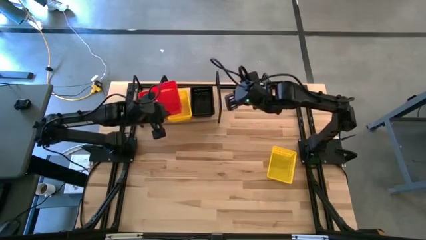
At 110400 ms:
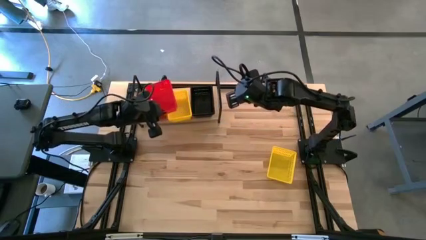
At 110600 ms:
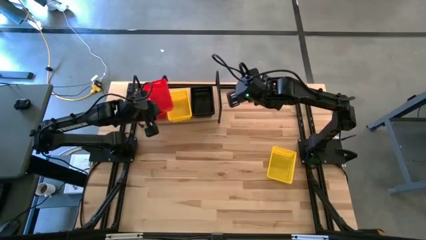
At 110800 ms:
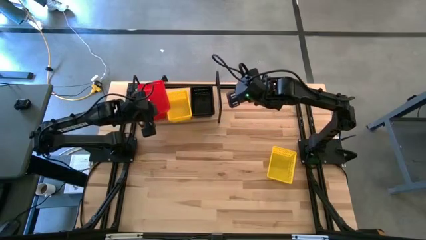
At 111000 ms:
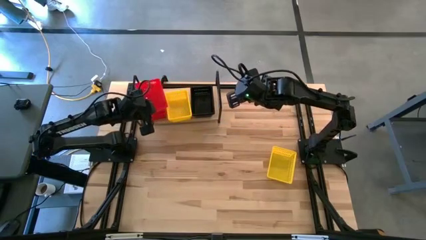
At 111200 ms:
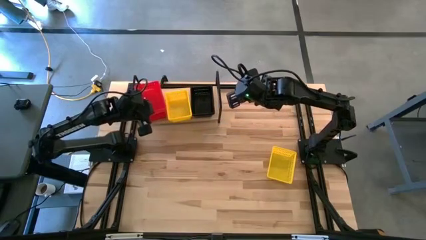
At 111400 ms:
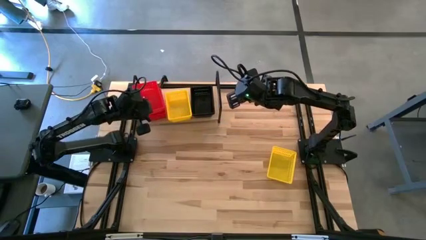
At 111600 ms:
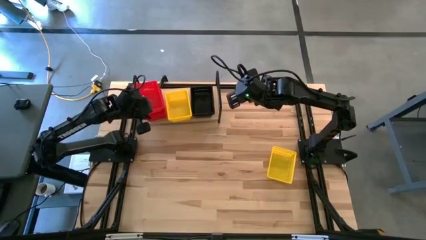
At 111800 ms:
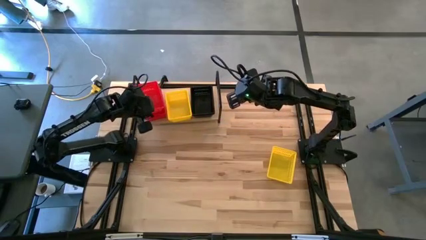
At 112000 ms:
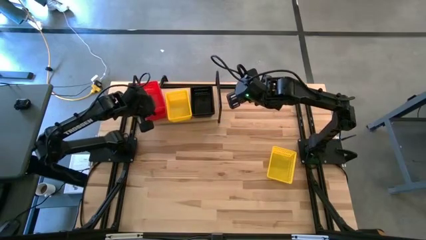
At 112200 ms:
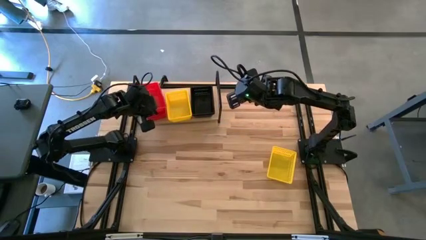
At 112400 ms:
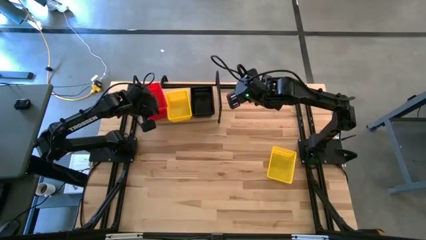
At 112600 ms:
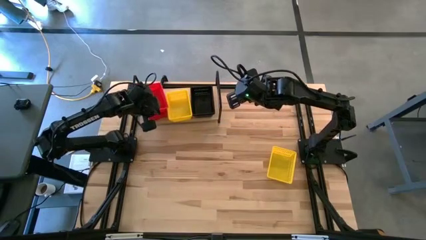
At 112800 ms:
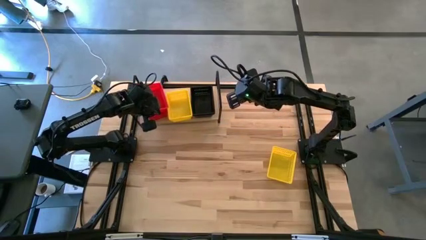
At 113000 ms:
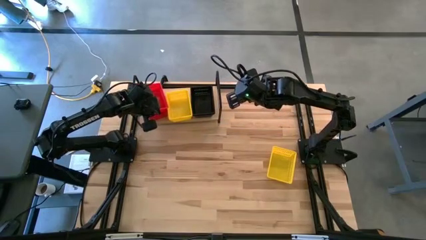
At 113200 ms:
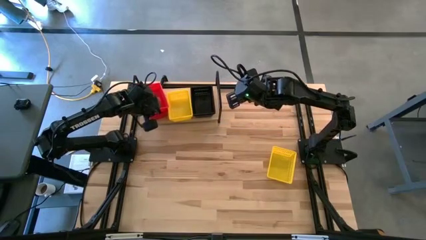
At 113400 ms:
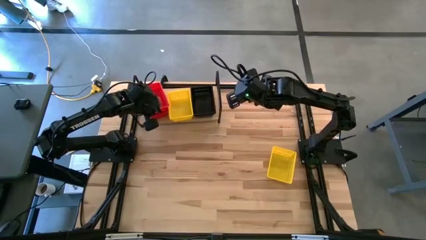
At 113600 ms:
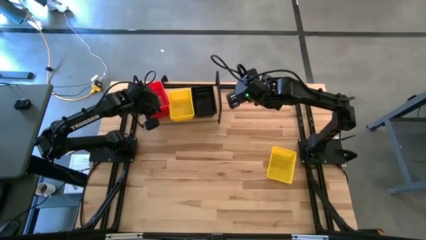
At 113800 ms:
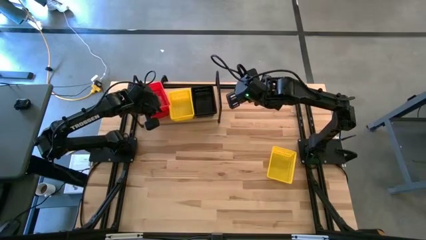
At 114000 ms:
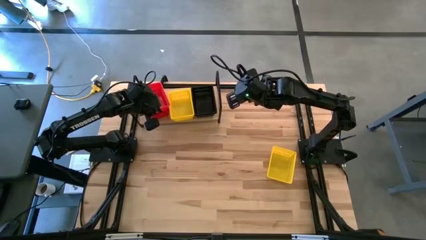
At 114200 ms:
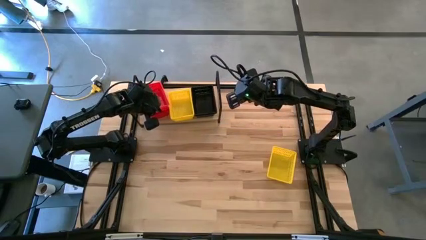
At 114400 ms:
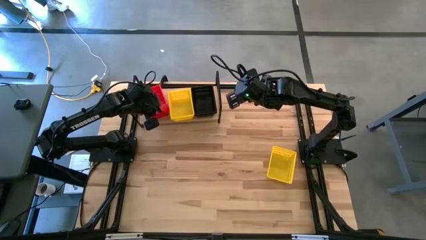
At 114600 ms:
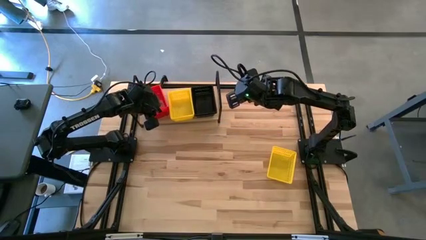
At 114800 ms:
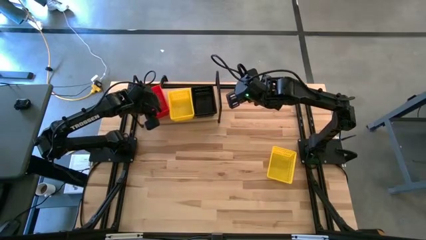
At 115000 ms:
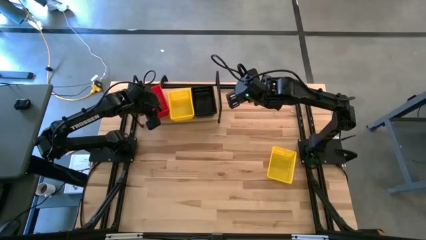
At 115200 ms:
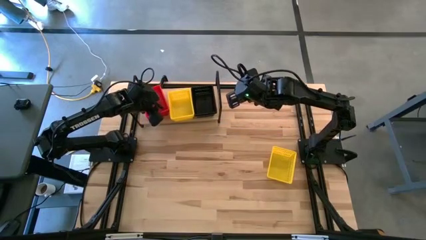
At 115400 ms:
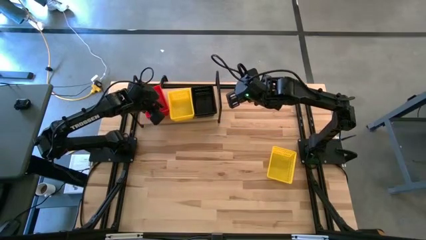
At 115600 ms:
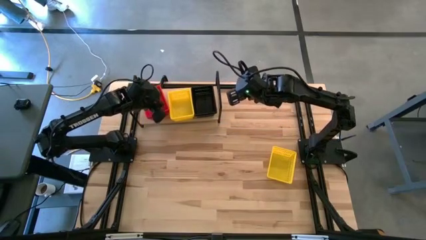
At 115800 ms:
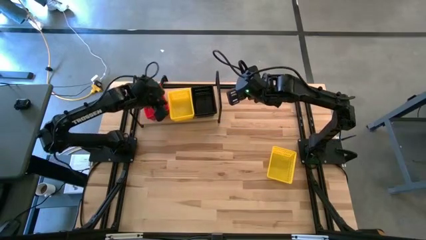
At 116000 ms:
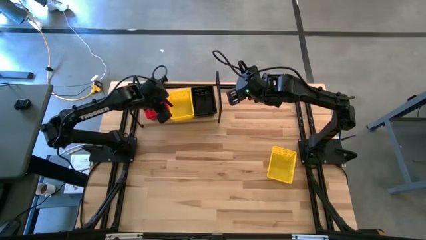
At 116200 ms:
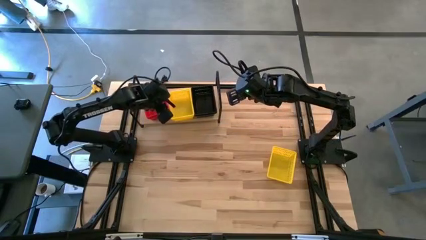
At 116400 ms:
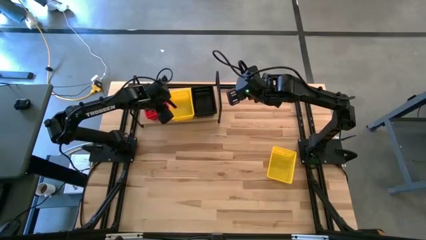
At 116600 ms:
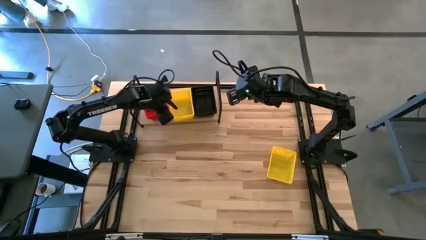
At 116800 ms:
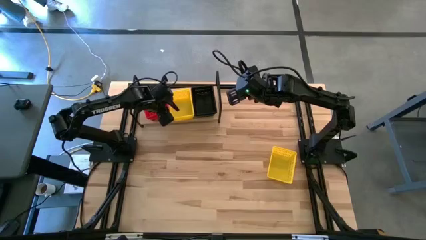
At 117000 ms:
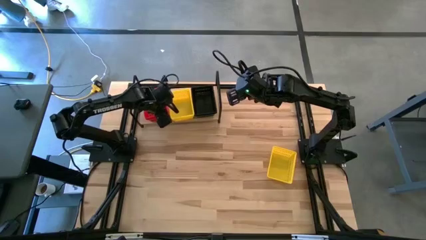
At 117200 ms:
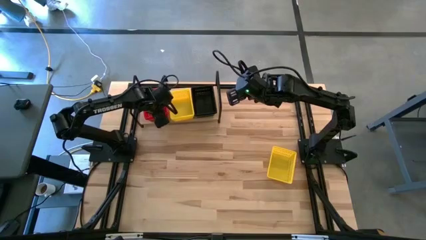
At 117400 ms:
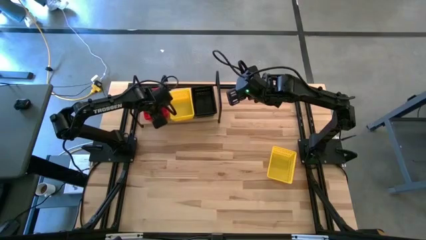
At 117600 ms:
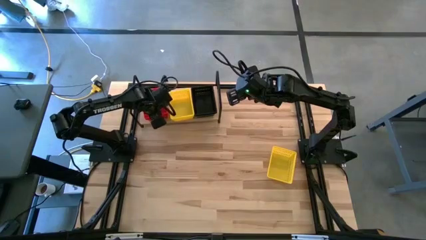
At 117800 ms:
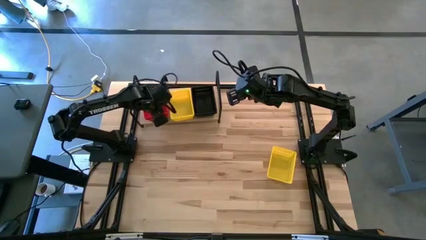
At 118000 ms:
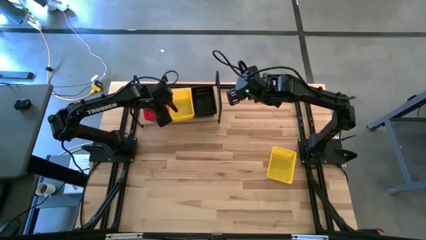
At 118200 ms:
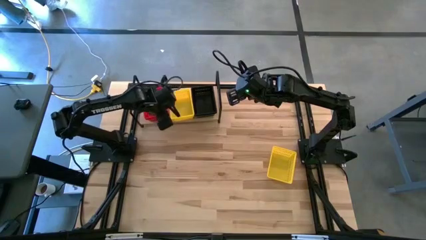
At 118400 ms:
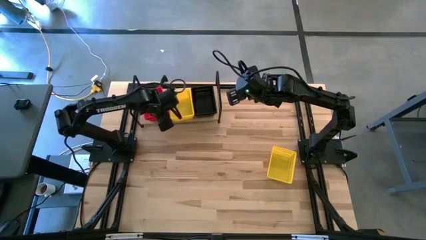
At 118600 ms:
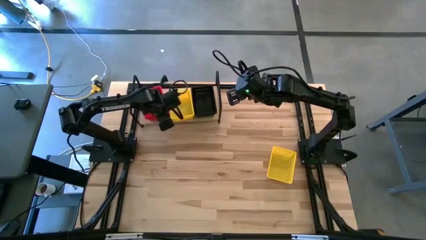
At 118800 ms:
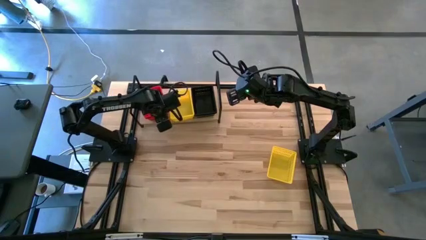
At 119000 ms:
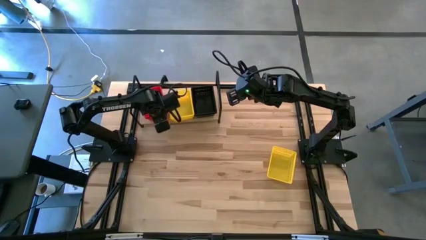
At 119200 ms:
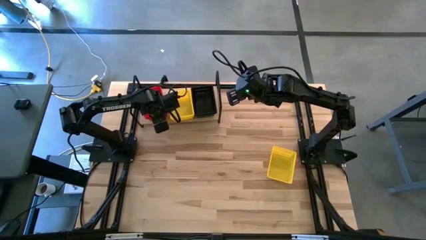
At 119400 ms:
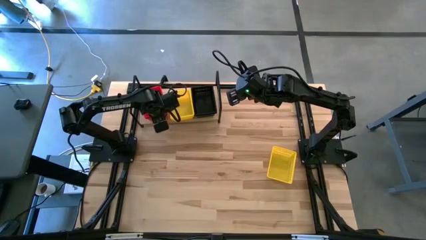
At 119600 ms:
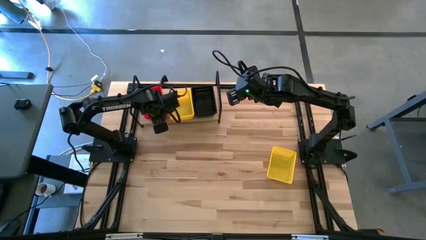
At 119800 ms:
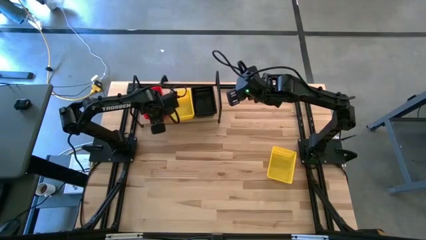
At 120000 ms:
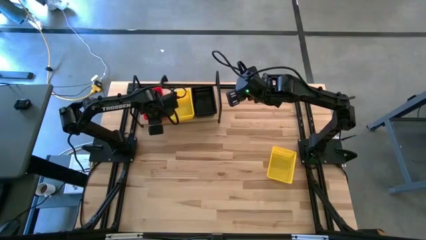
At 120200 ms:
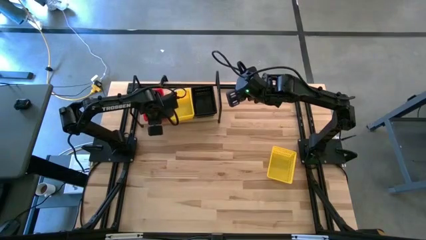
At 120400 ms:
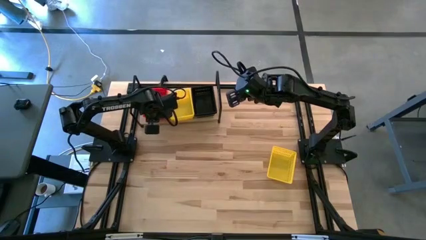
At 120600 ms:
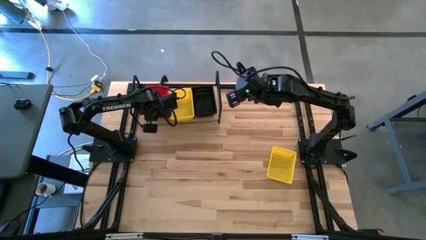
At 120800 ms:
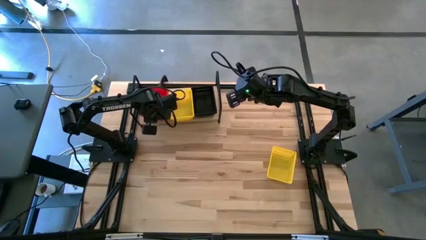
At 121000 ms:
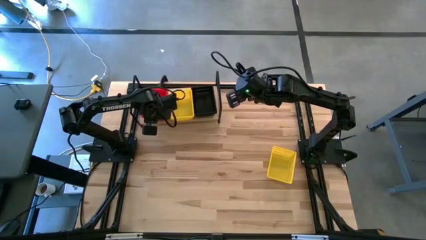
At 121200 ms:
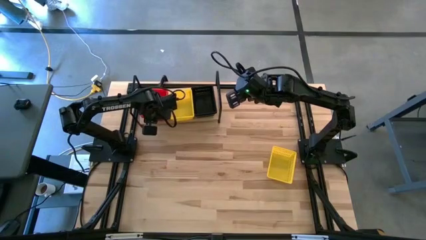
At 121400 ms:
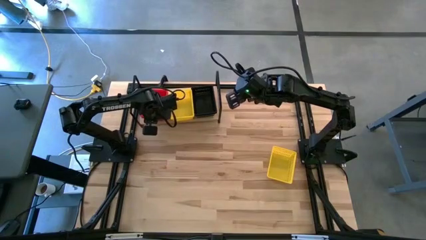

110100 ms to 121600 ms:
Task: Stack baskets on shelf by color
Stack the red bin on top of the red bin on the shelf

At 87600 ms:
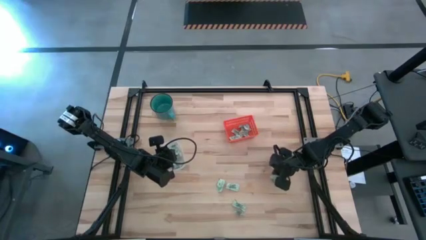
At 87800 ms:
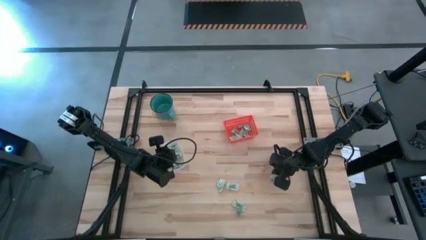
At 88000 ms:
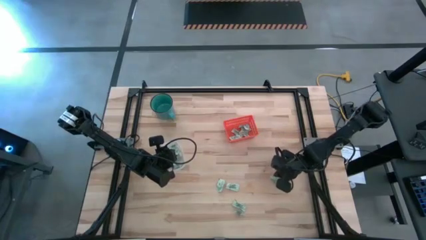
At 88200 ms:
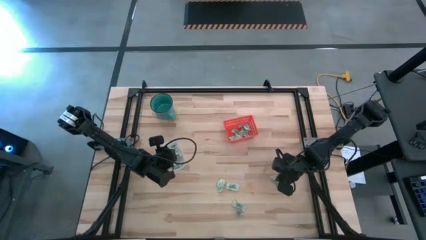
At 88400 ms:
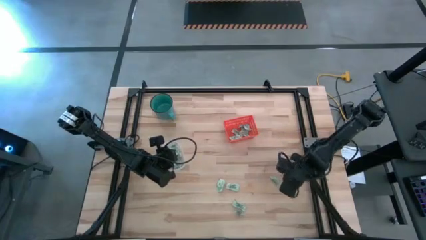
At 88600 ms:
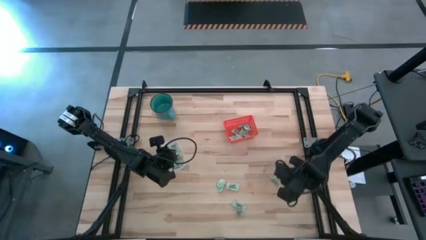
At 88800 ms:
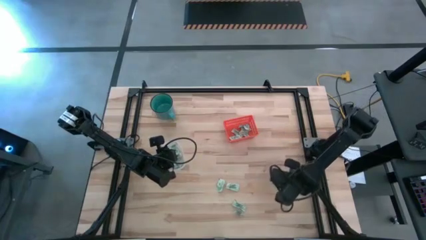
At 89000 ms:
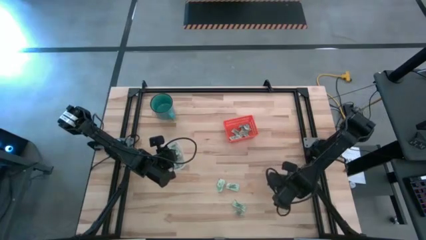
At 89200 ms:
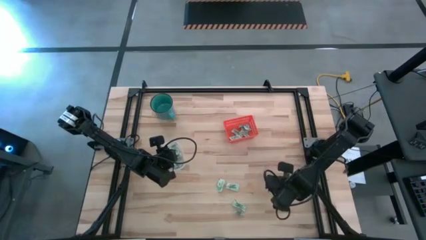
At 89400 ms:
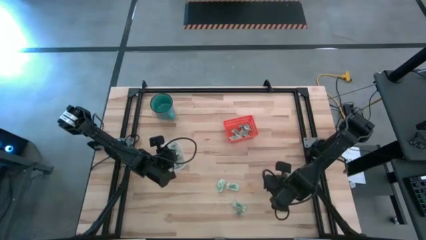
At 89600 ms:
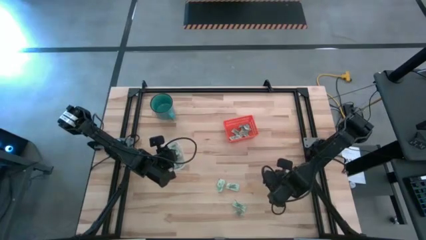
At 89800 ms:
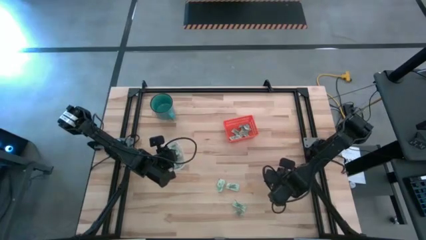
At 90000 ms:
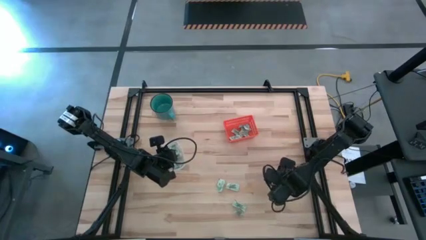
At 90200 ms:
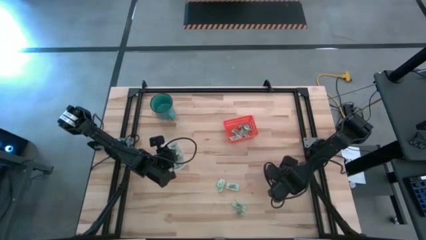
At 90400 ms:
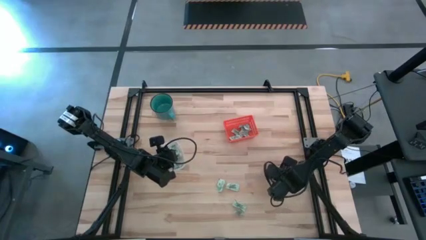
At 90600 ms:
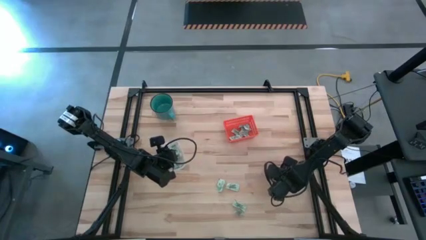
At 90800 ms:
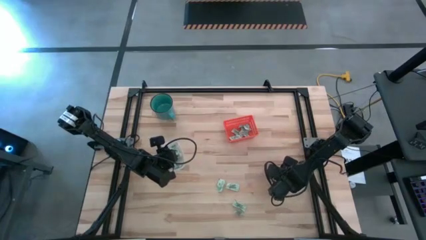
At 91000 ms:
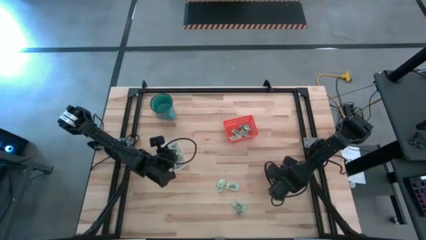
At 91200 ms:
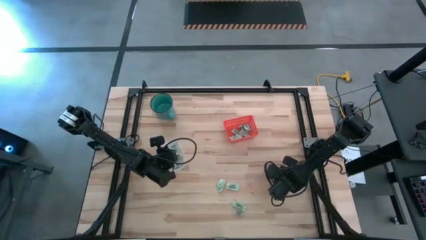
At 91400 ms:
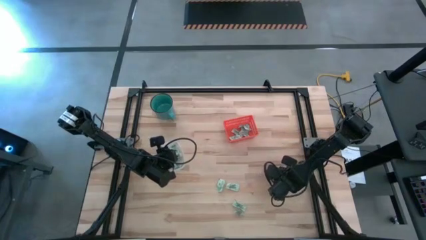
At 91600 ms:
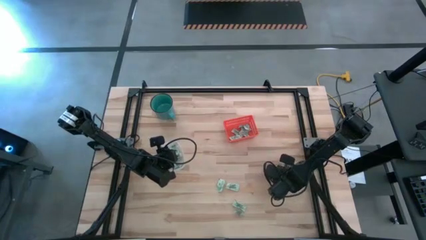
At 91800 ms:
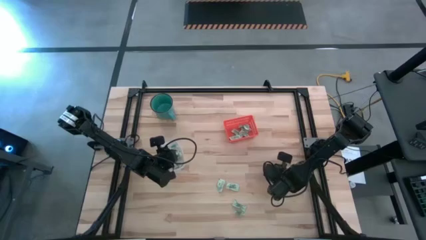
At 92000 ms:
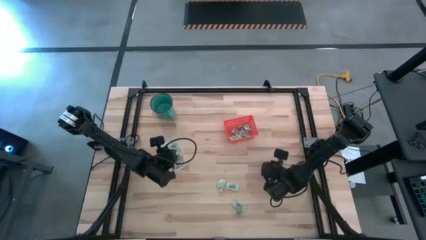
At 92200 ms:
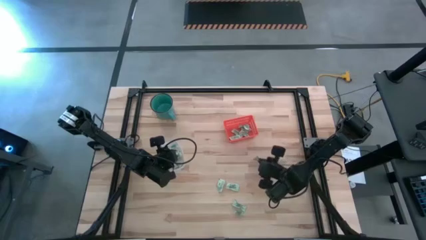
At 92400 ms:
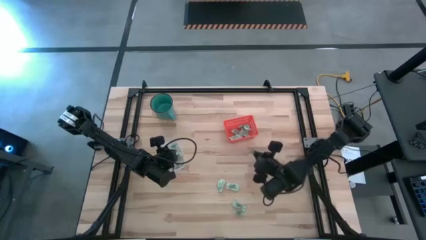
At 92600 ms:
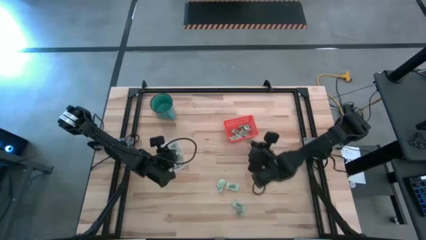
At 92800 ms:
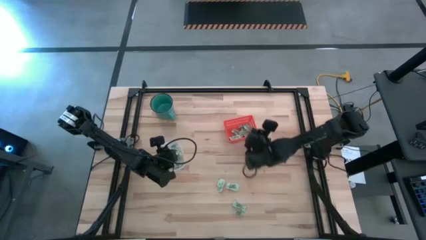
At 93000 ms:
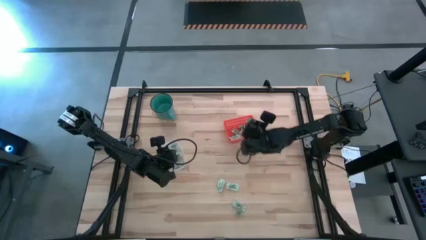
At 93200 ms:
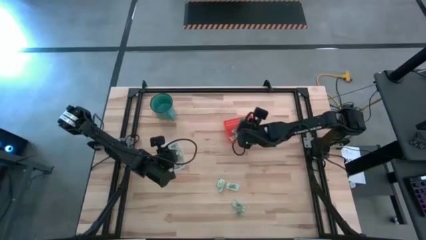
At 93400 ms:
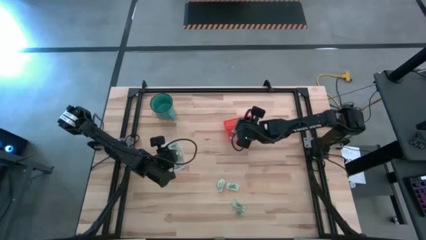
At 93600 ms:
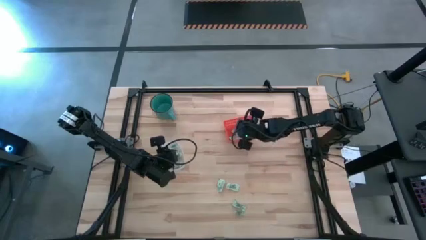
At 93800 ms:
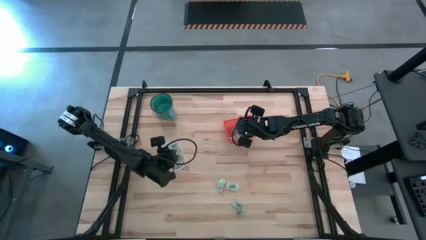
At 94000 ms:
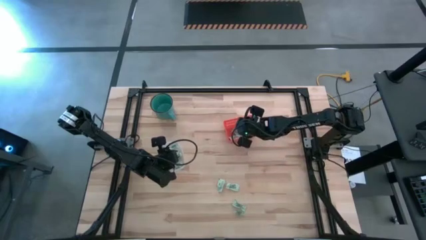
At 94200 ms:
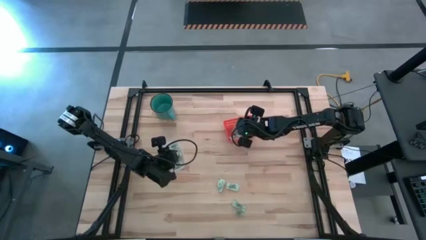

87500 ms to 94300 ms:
Task: Pick and place items into bin
Put the light green stevia packet into the orange bin
